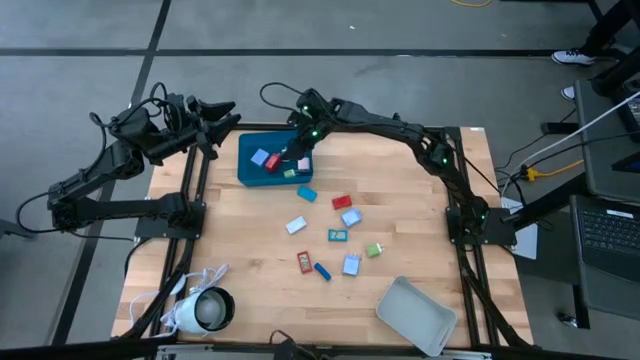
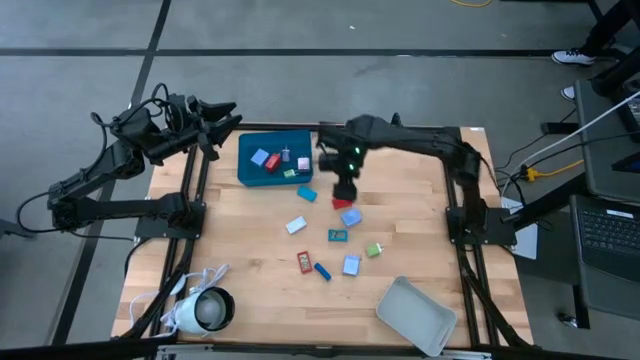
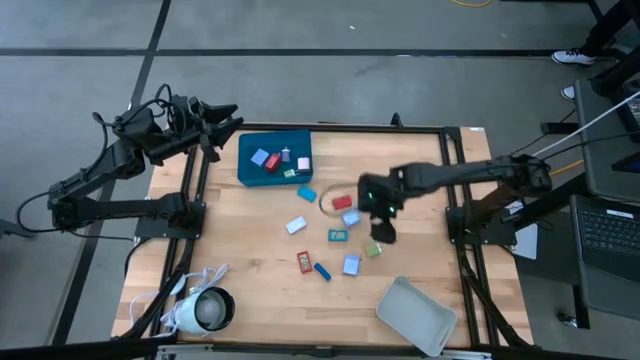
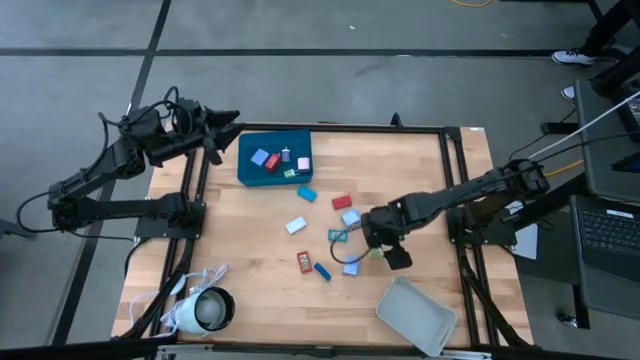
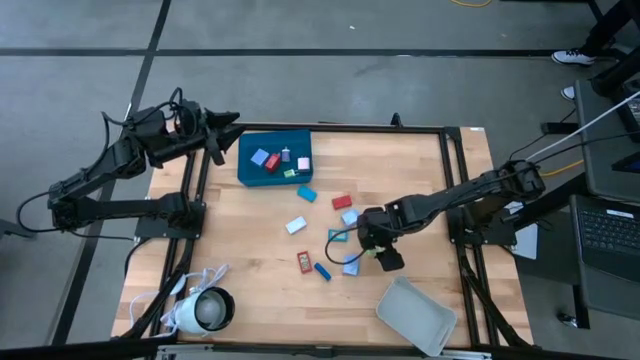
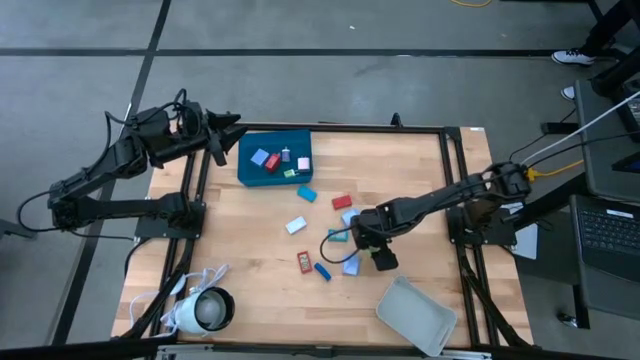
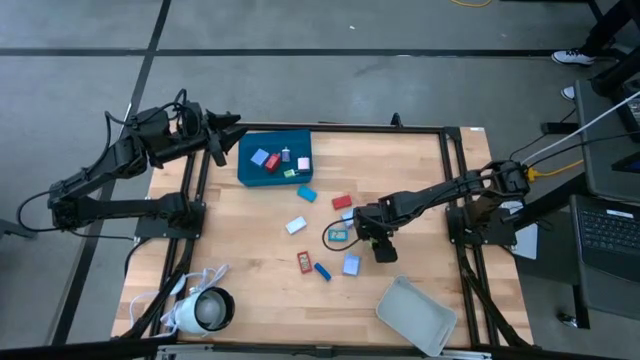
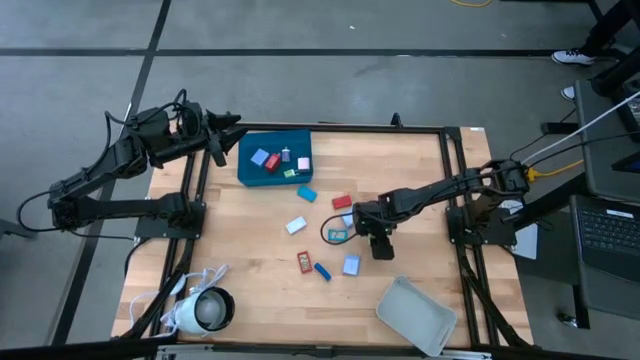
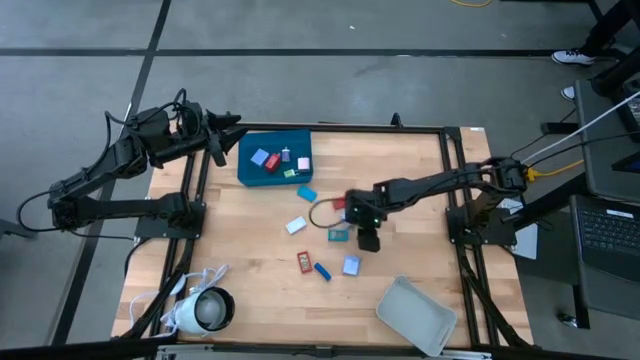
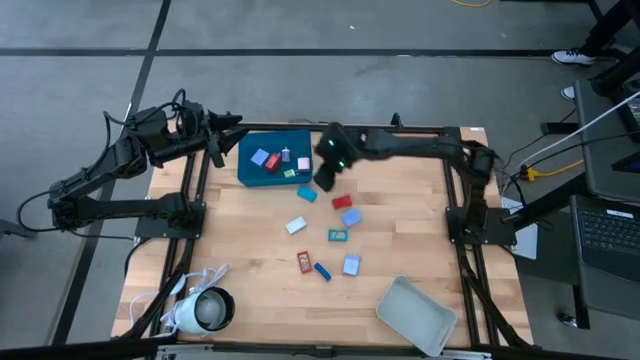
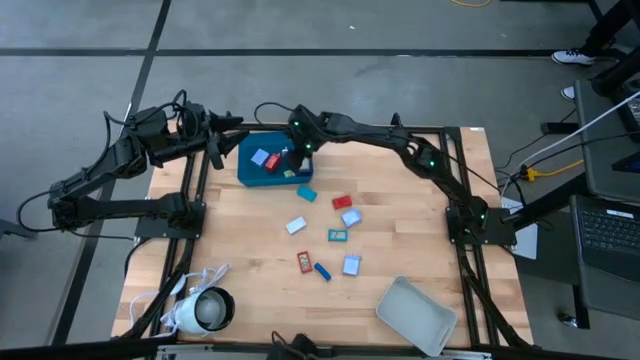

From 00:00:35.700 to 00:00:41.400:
Task: Pick & Place Office items
Put the green charger adapter into the blue bin

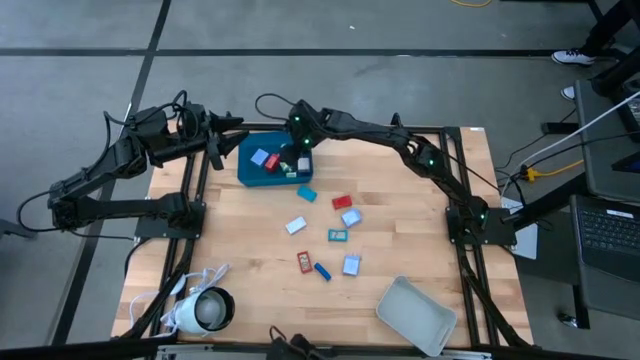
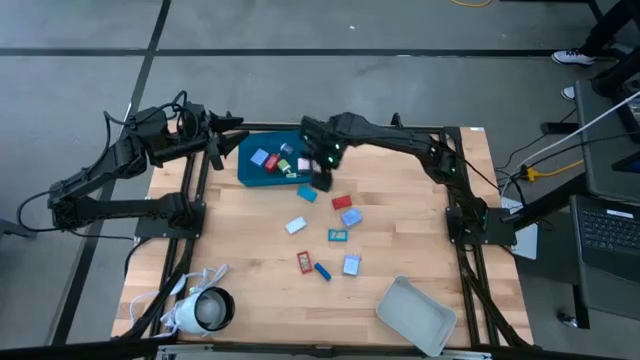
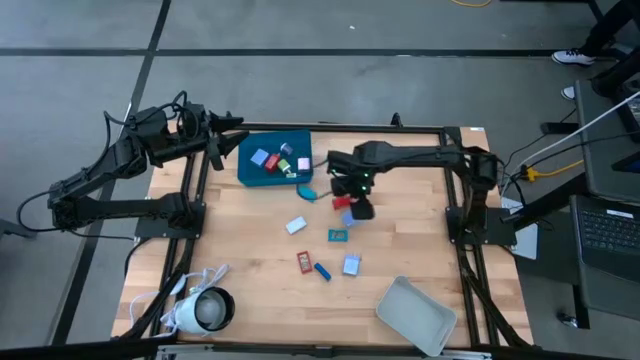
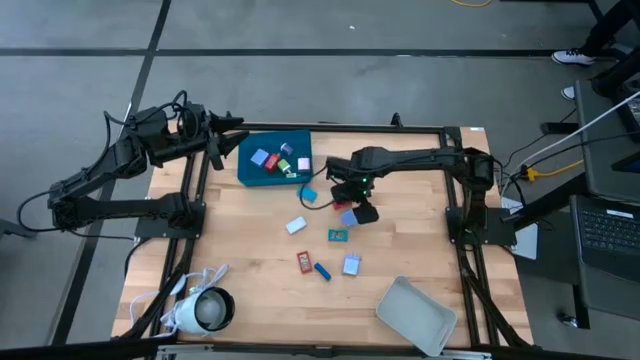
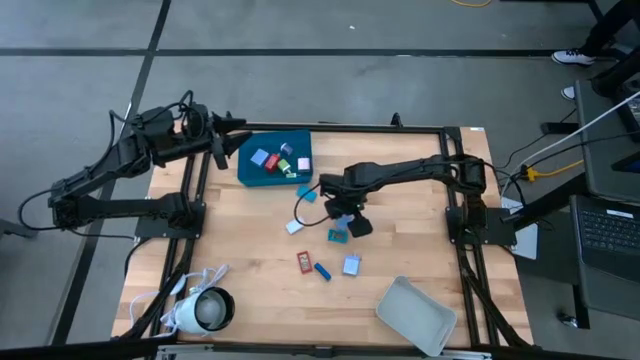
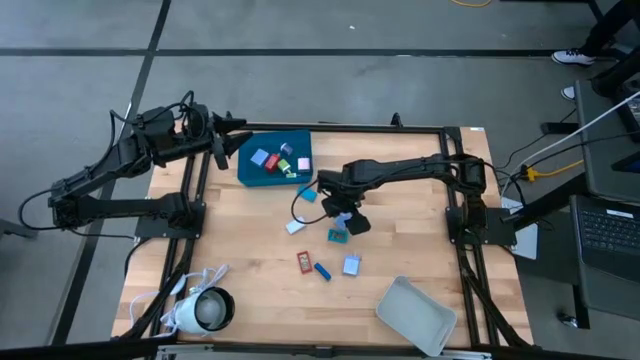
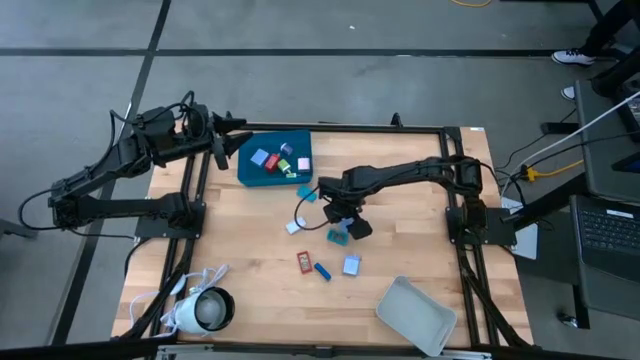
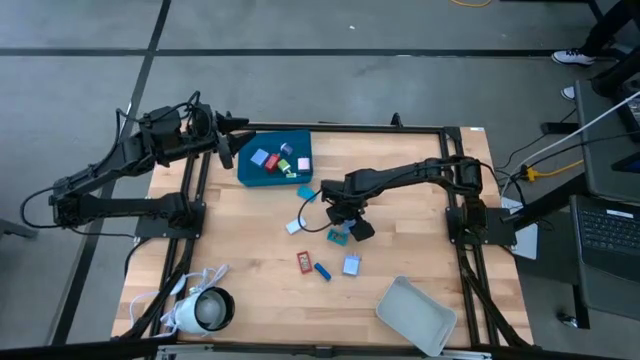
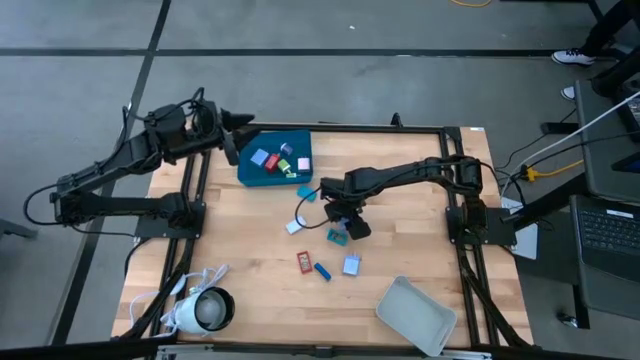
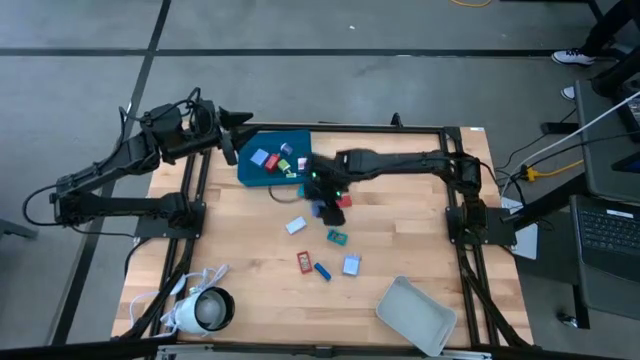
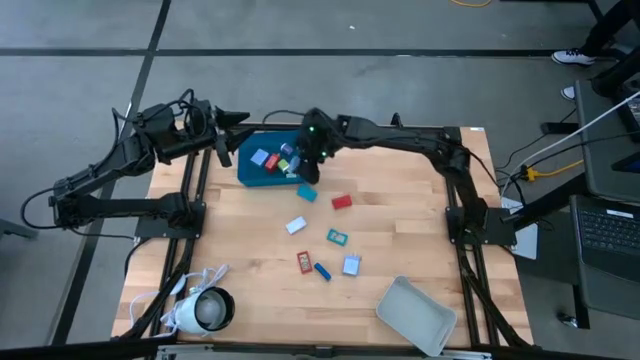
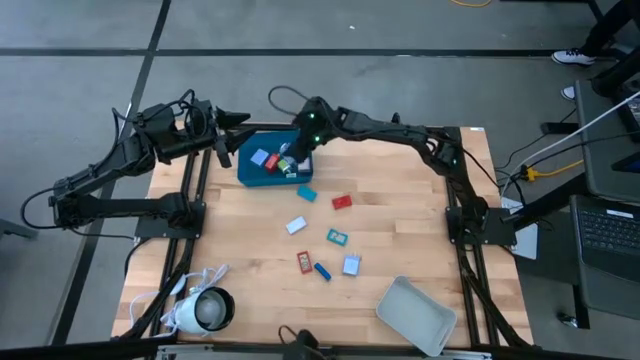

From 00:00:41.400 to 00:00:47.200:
Put the top light blue charger adapter into the blue bin

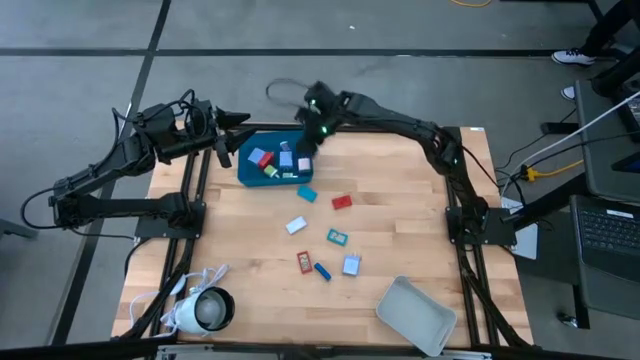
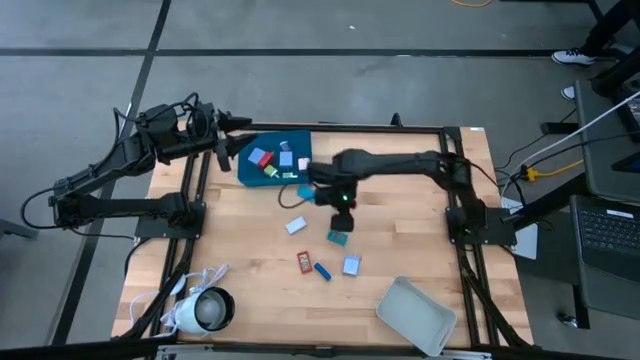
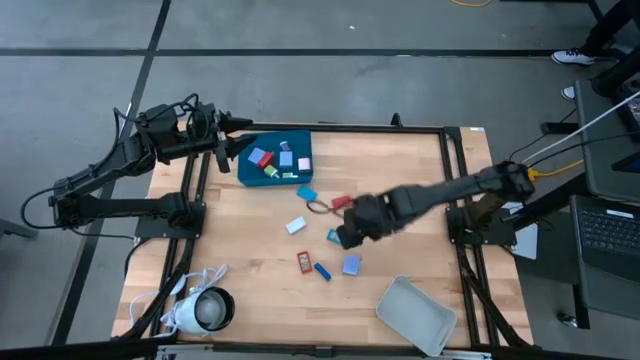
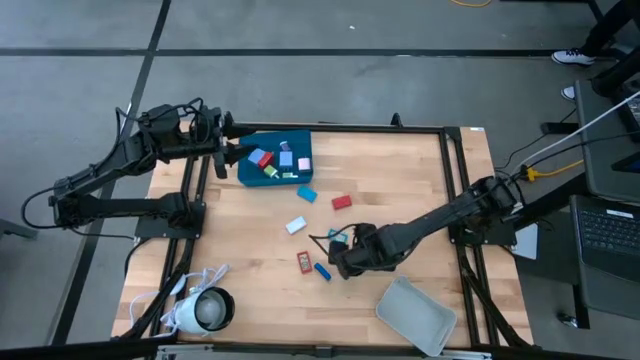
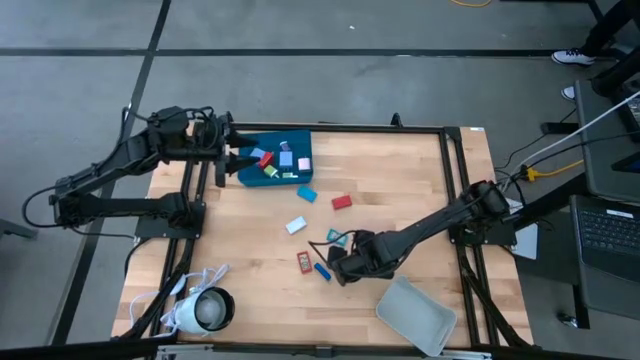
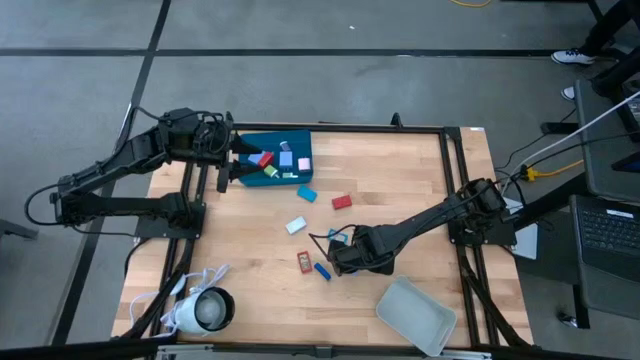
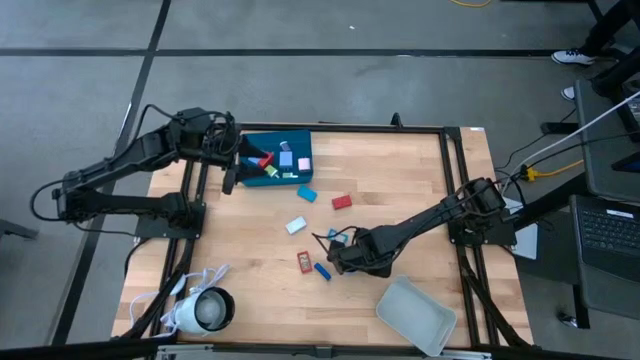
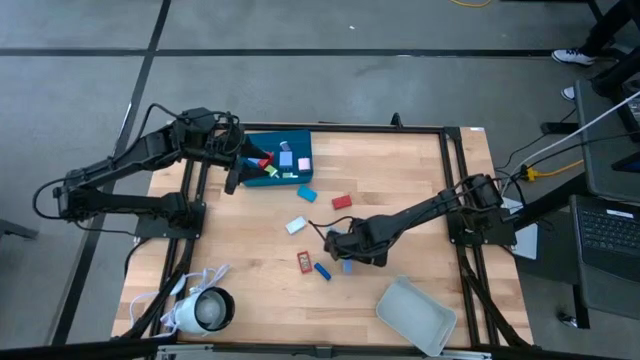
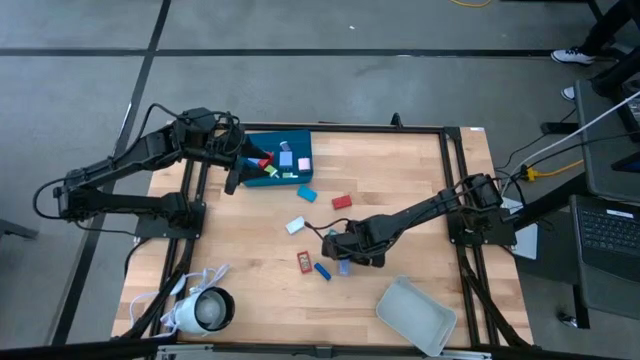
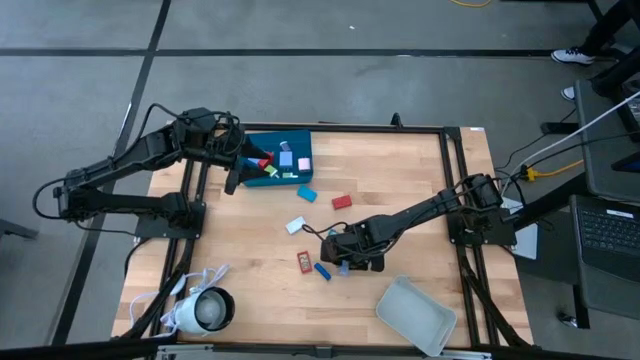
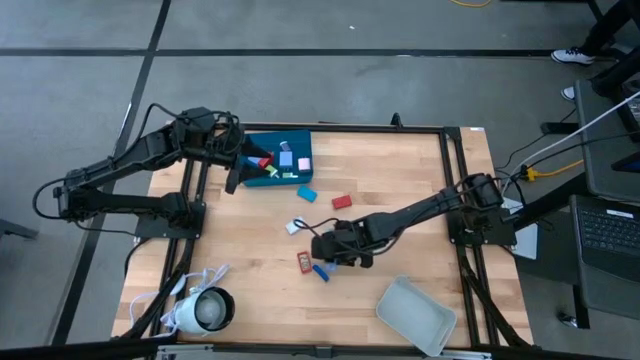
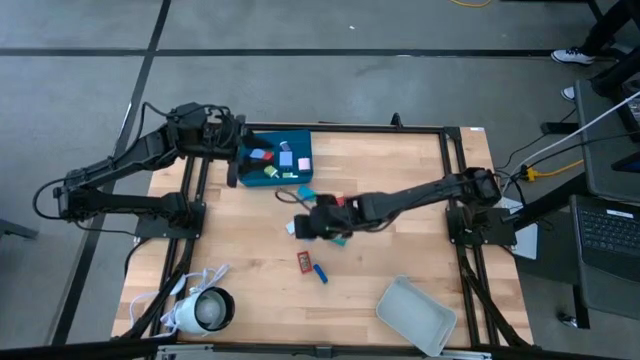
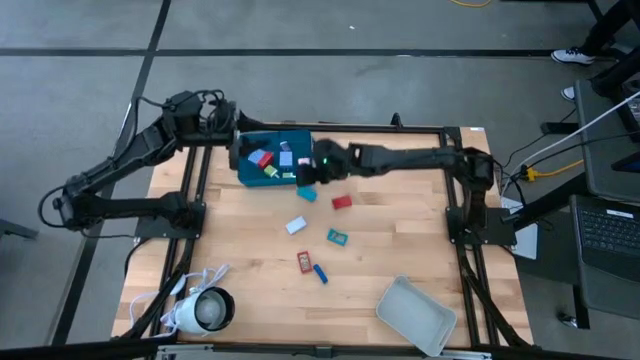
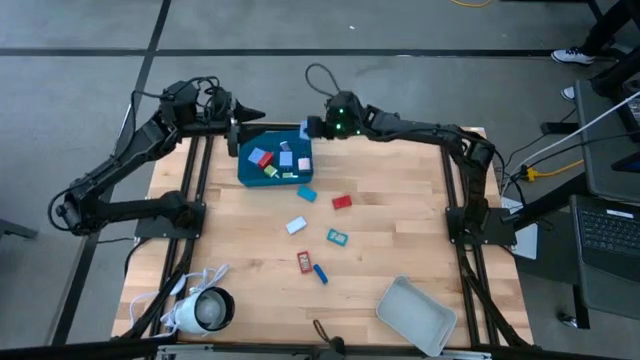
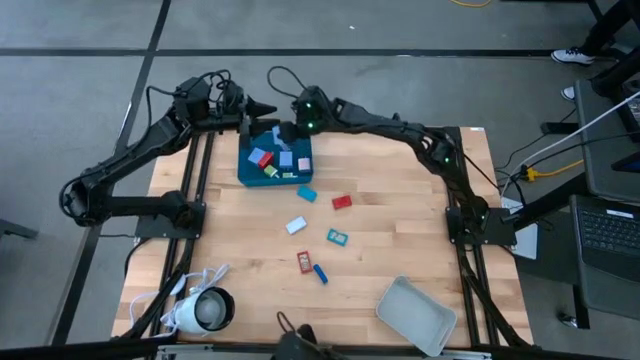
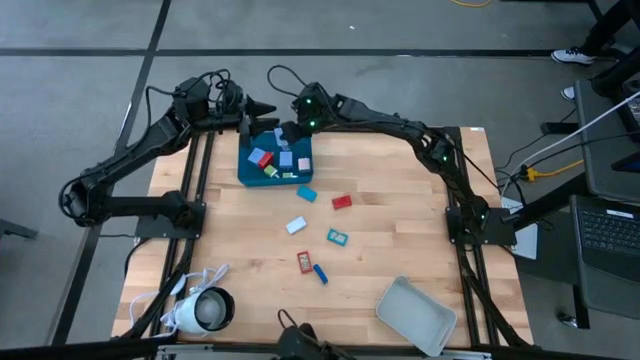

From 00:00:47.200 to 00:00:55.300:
Put the light blue charger adapter into the blue bin
